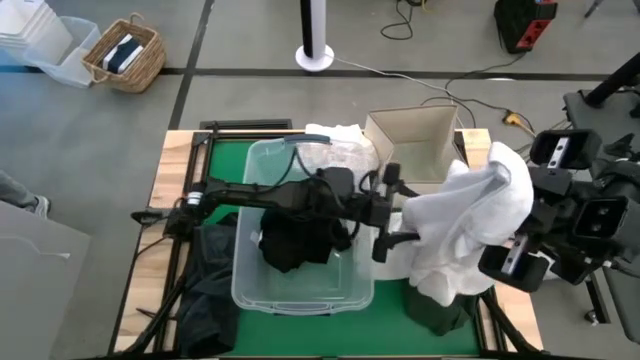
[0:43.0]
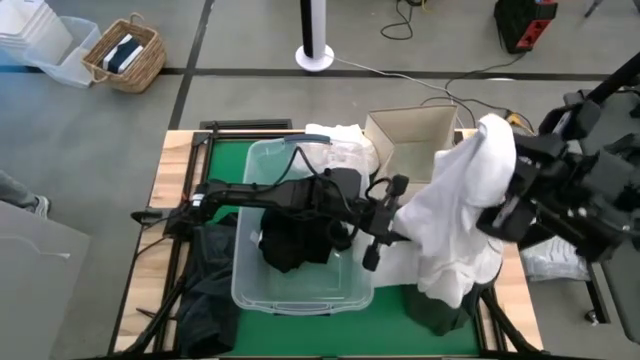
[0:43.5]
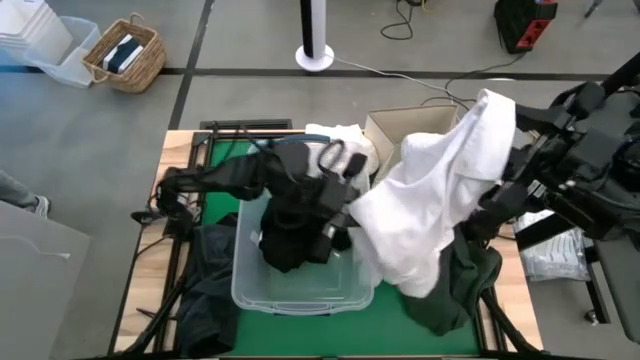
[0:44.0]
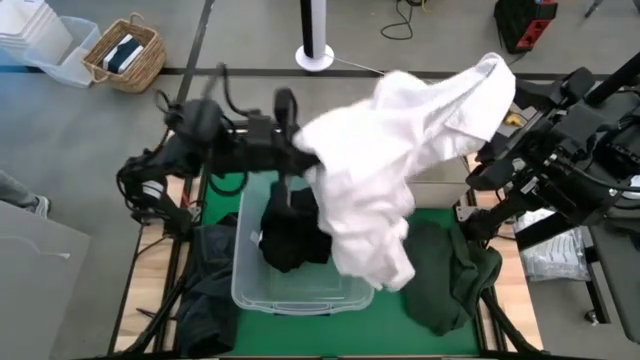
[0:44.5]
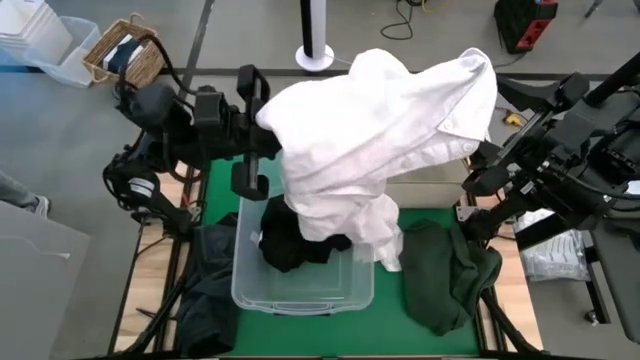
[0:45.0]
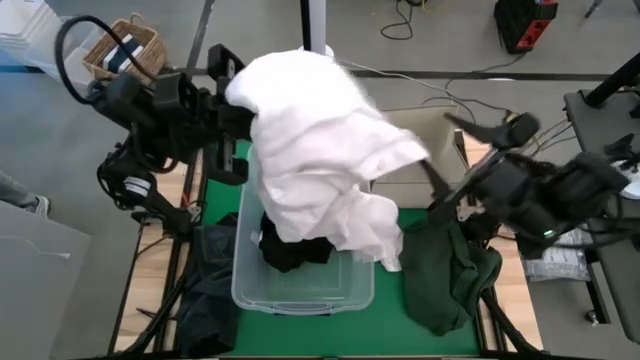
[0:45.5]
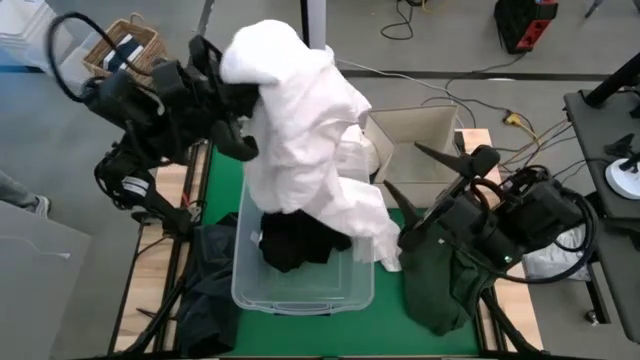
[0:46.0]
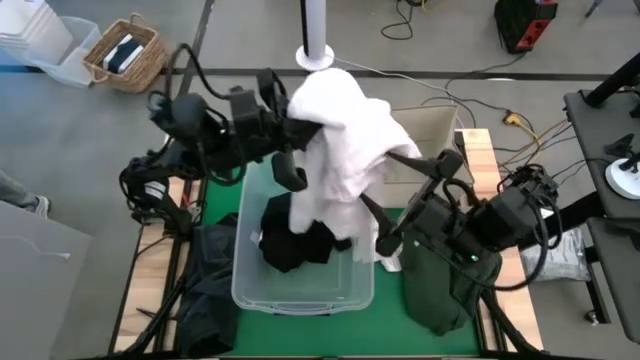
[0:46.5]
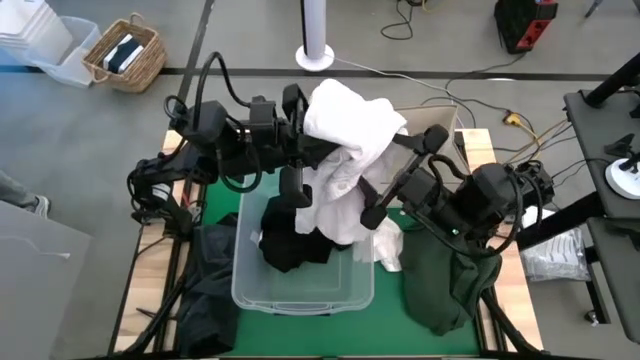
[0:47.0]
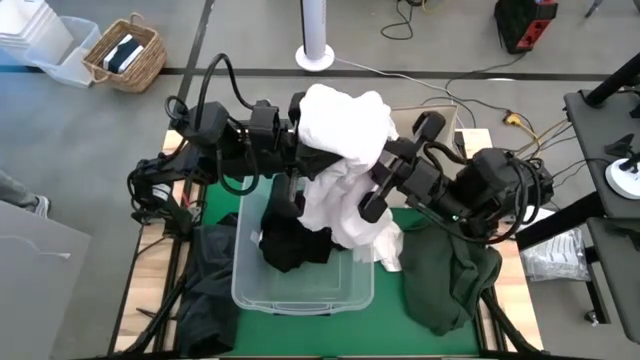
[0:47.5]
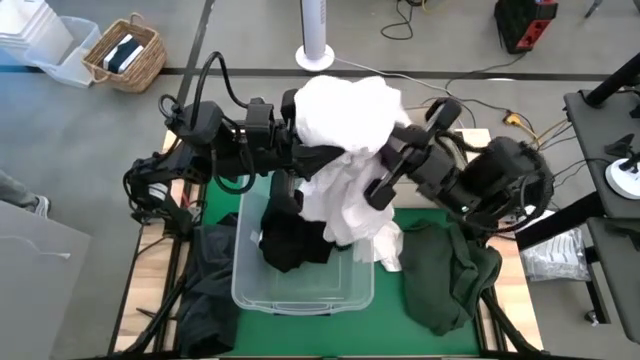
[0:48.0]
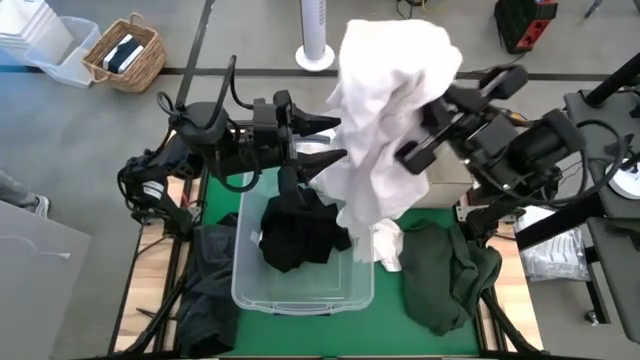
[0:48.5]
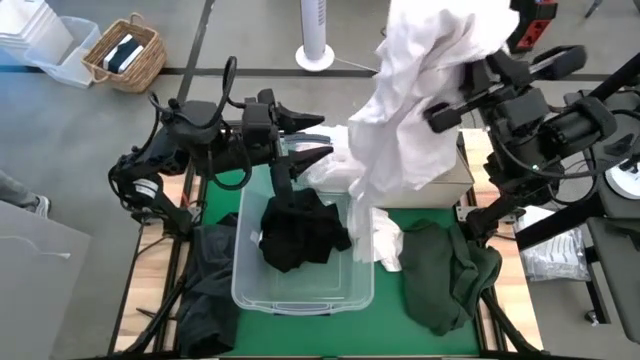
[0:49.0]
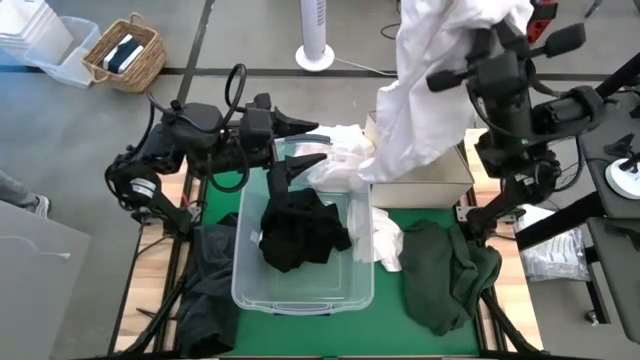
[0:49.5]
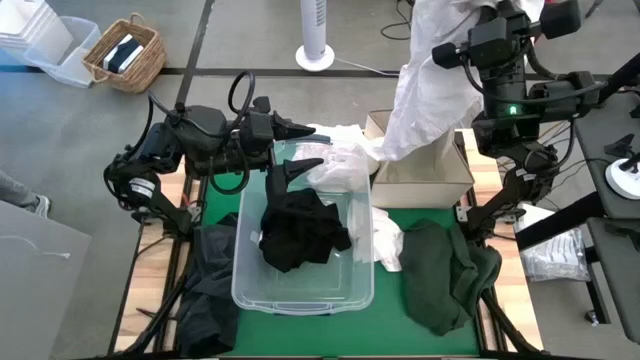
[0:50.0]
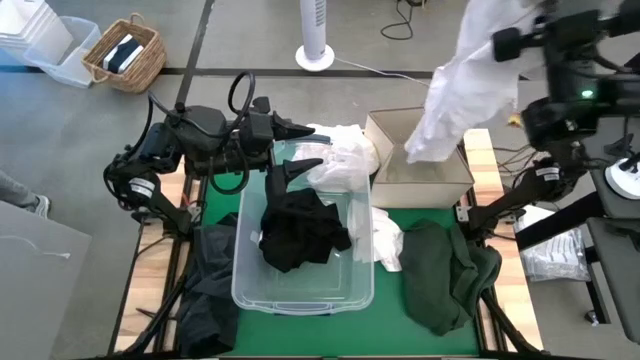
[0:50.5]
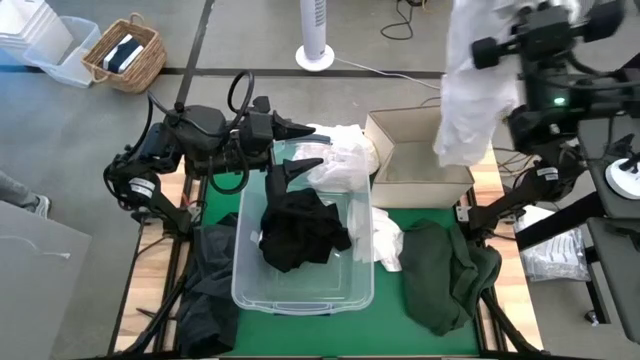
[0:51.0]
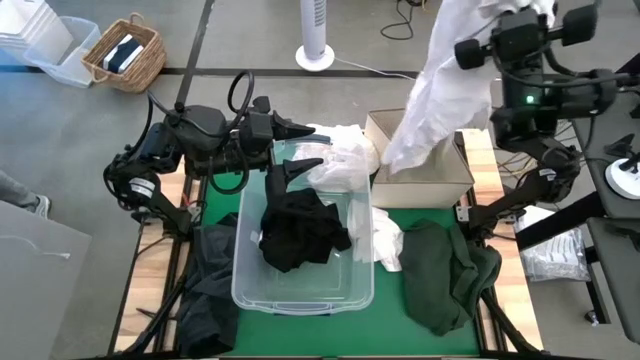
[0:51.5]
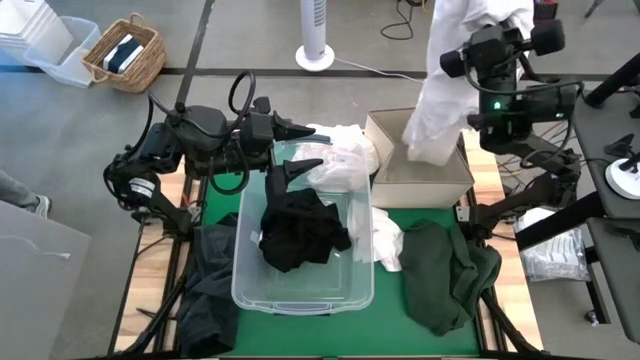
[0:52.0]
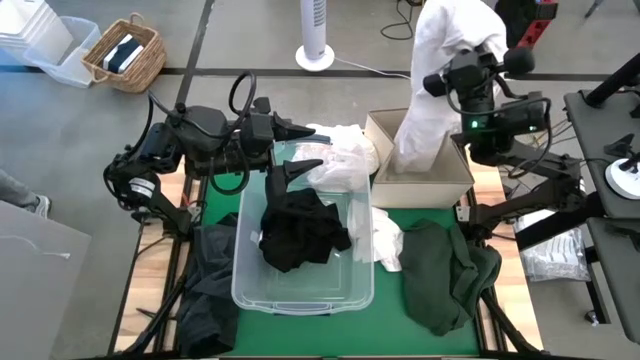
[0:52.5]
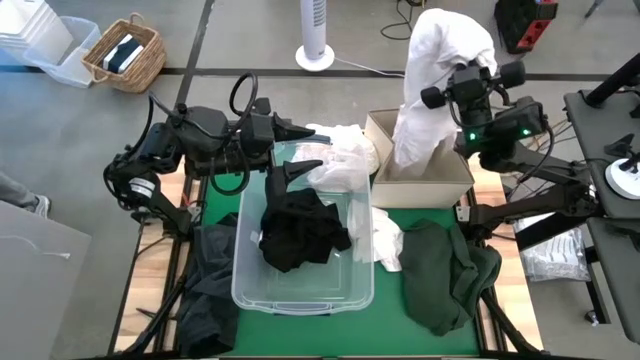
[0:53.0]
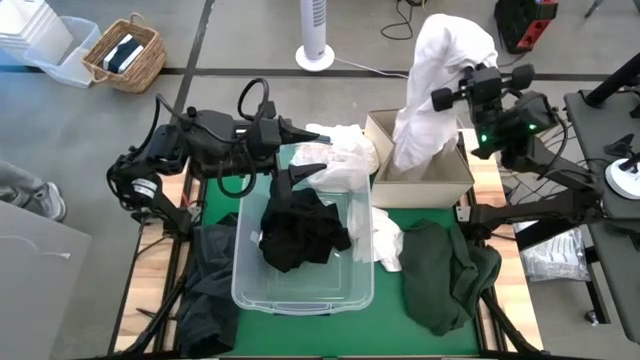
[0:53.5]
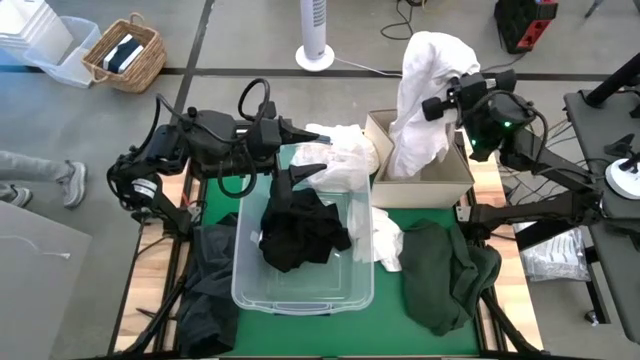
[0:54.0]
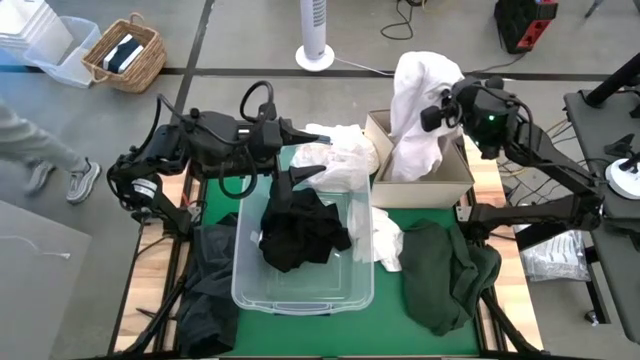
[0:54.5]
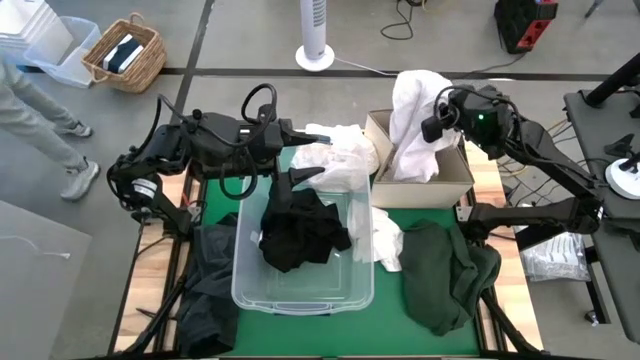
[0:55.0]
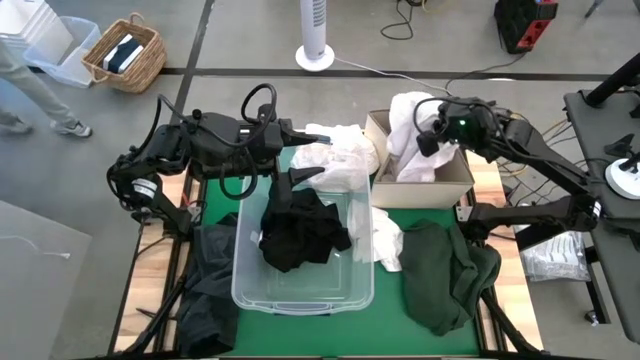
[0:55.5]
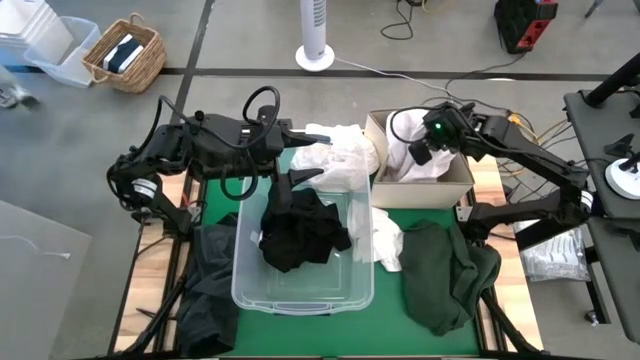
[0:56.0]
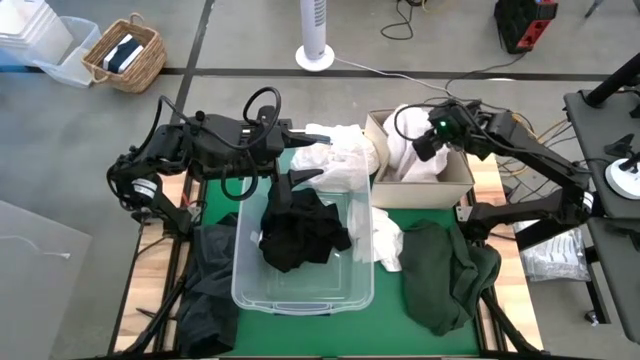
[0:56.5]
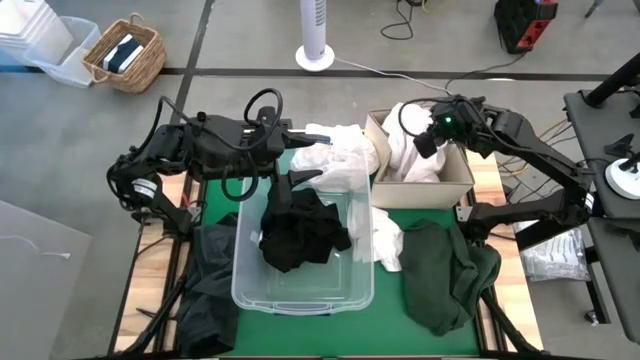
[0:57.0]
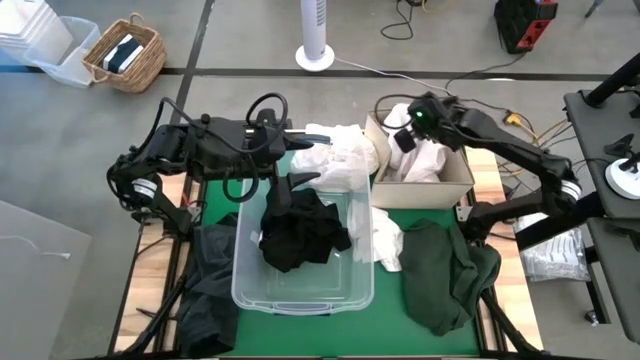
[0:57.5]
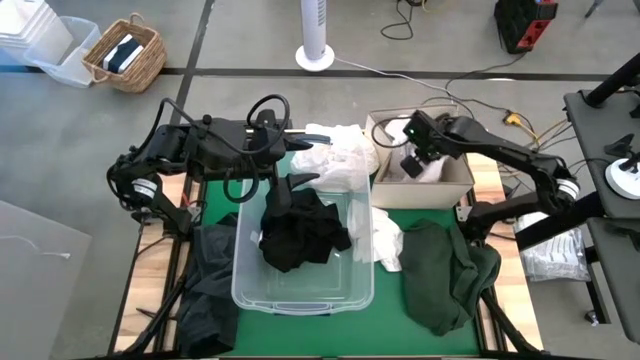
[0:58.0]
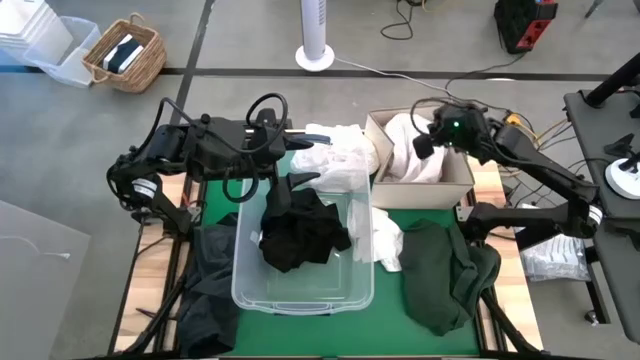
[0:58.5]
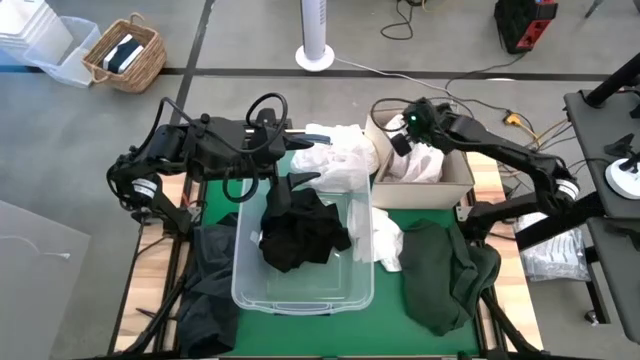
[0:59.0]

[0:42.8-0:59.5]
Put the white polo shirt into the laundry organizer

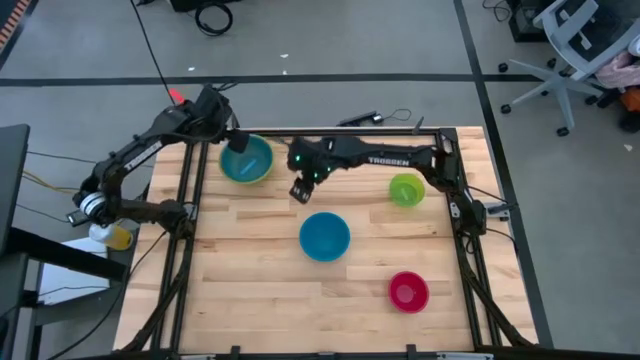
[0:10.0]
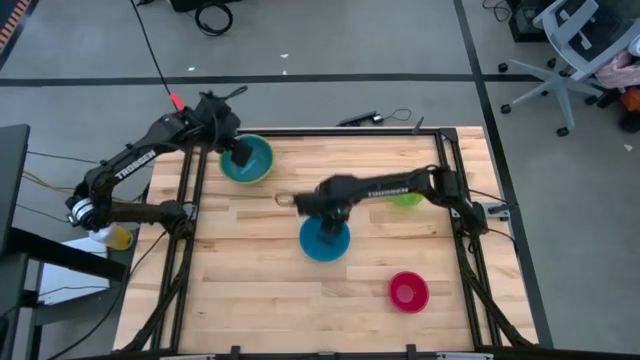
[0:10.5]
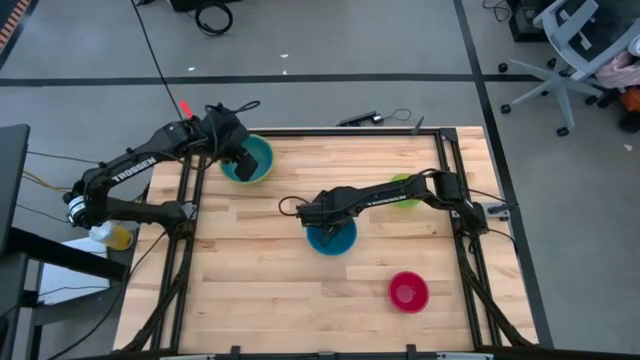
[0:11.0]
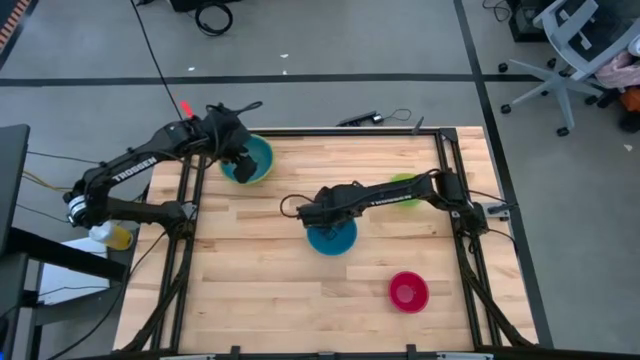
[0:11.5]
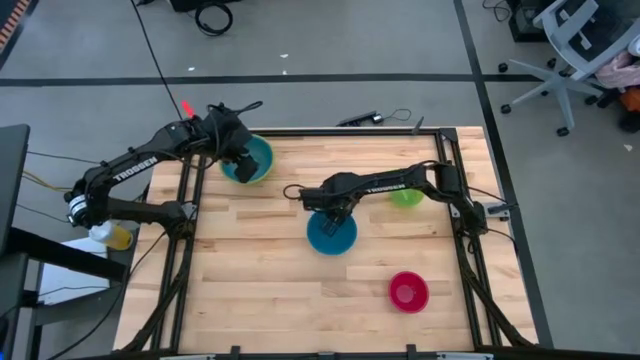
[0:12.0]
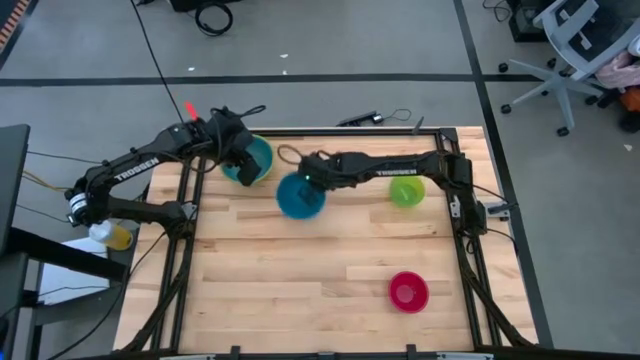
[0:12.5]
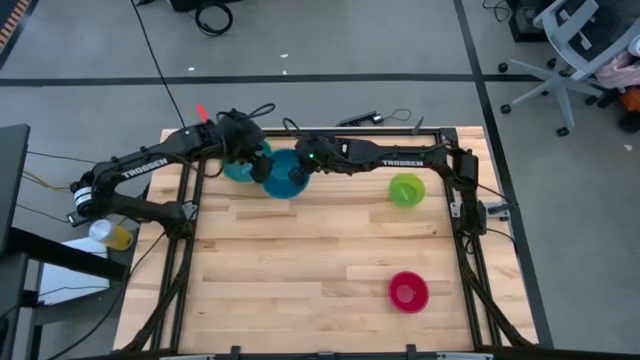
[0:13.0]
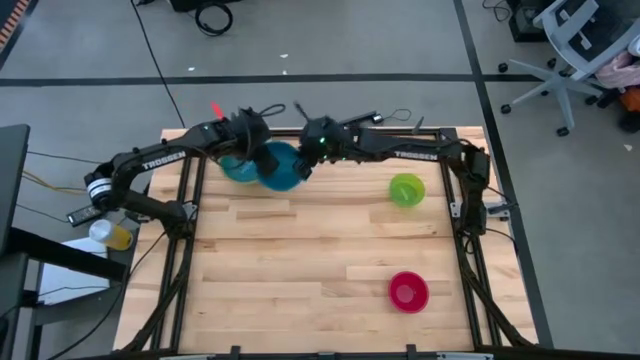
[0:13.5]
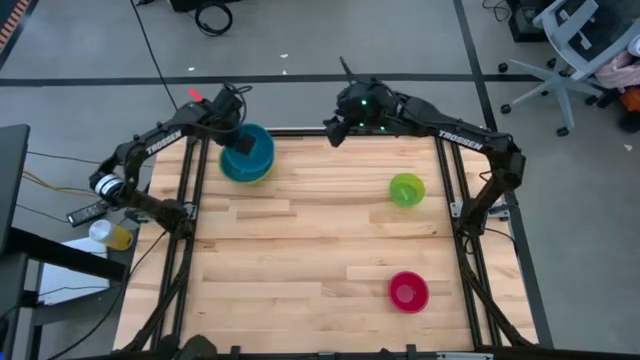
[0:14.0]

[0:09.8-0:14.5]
Stack the blue bowl on the light blue bowl

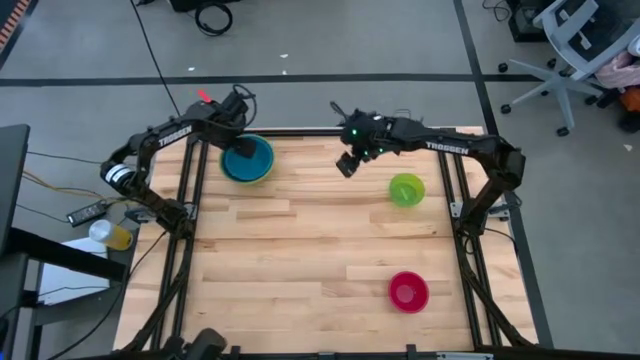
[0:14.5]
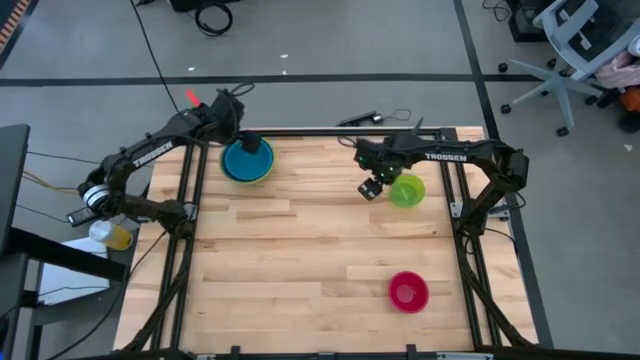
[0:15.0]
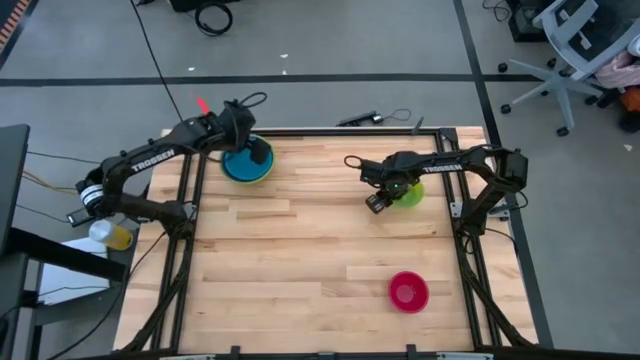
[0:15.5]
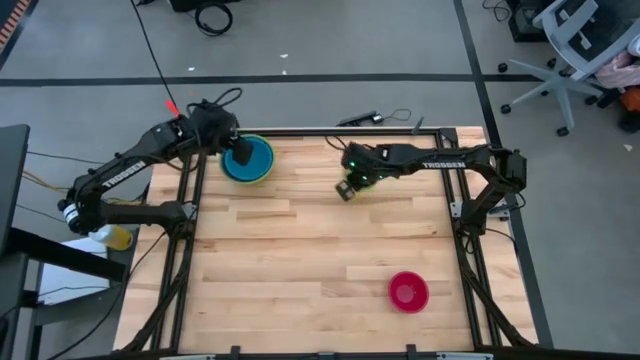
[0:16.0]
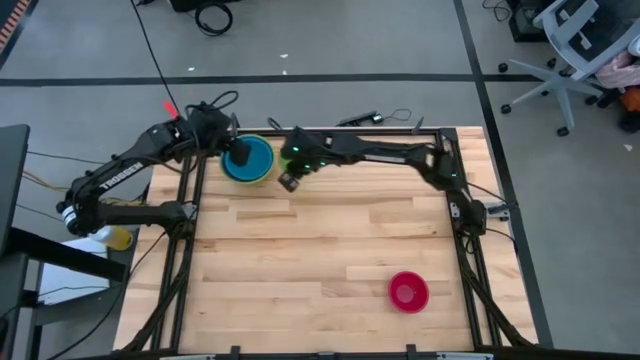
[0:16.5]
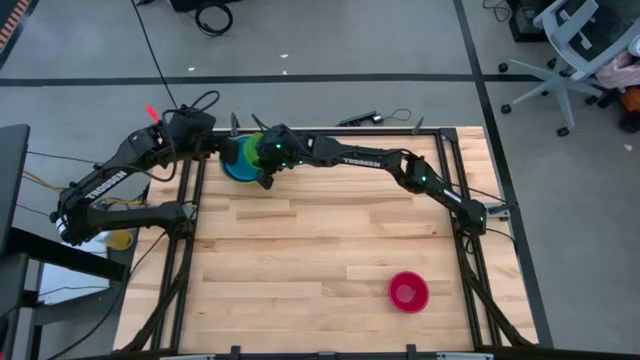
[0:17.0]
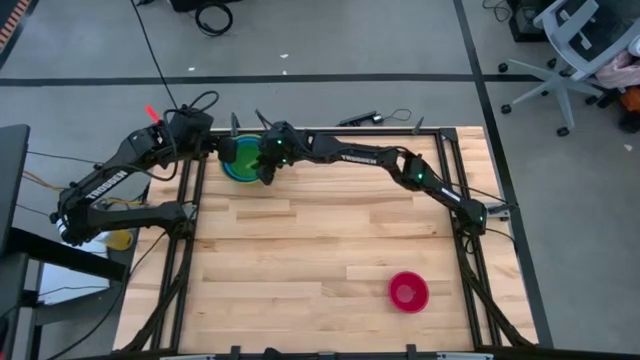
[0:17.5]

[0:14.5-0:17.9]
Stack the light green bowl on the blue bowl
